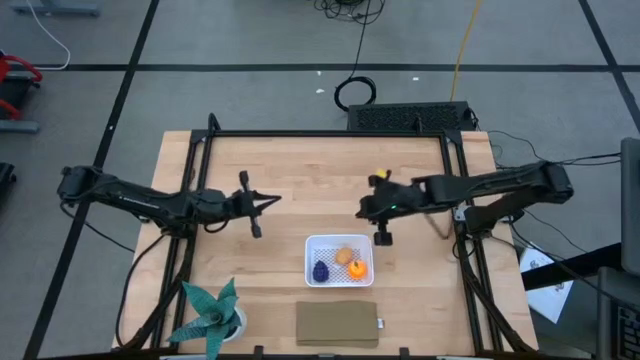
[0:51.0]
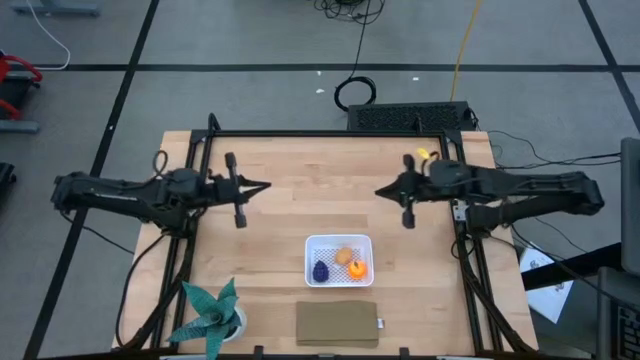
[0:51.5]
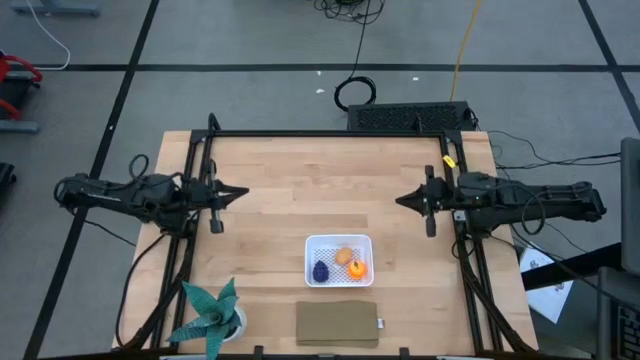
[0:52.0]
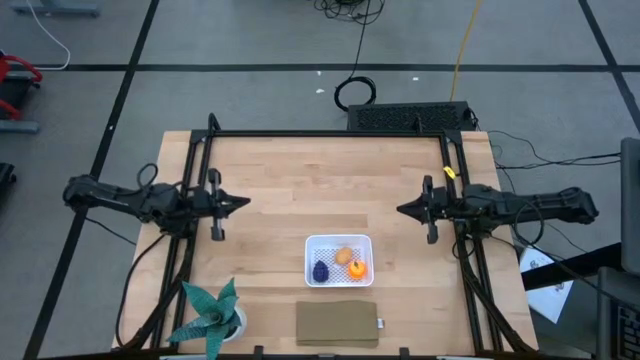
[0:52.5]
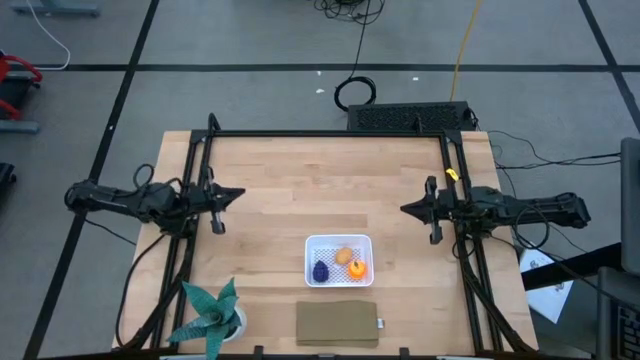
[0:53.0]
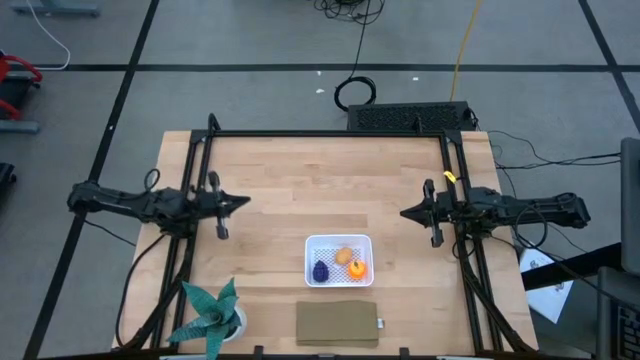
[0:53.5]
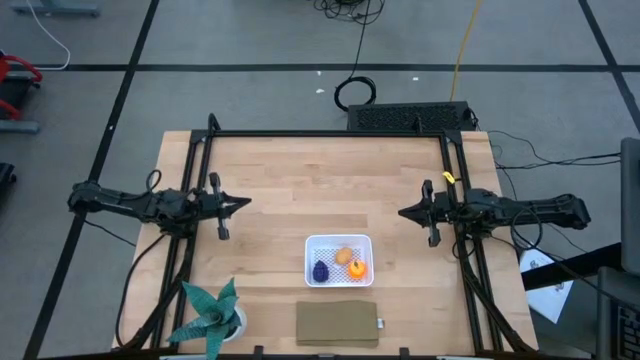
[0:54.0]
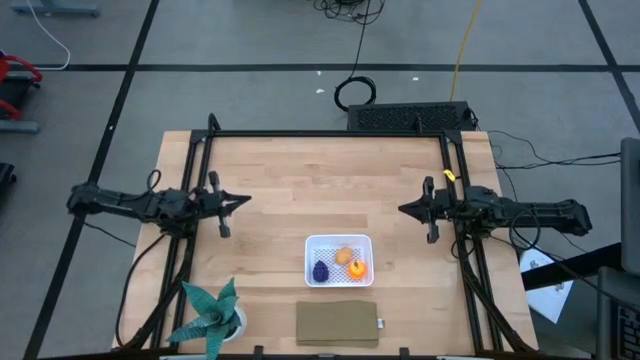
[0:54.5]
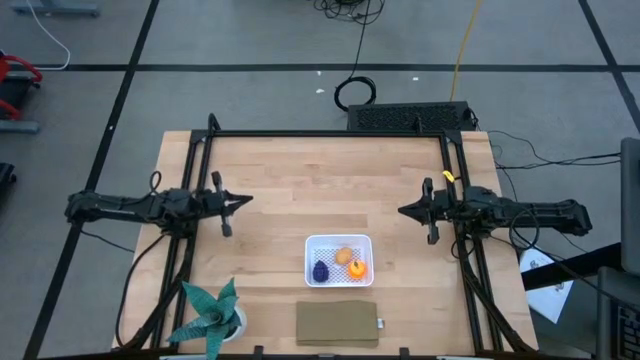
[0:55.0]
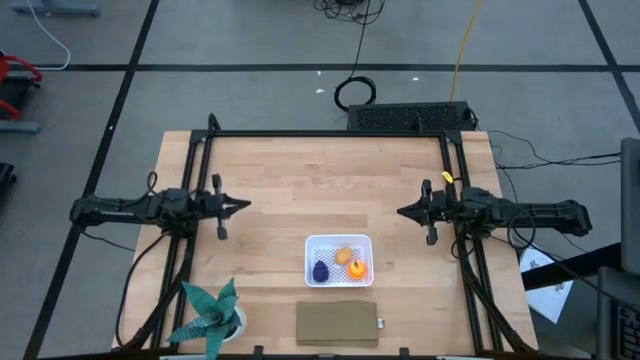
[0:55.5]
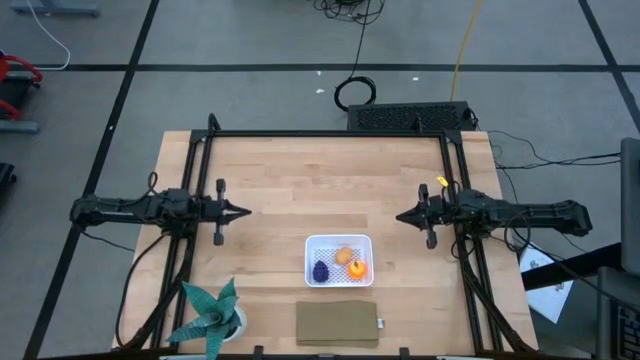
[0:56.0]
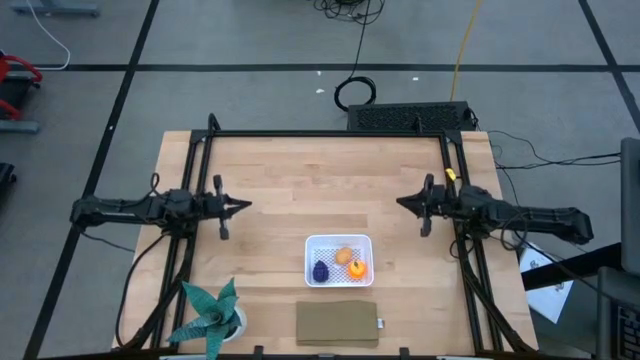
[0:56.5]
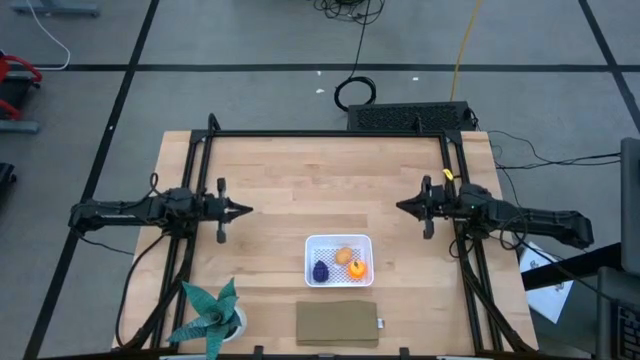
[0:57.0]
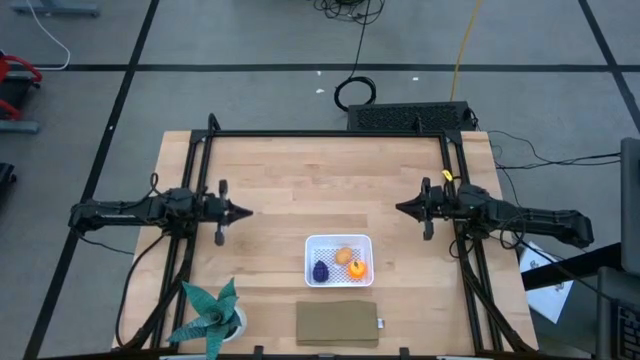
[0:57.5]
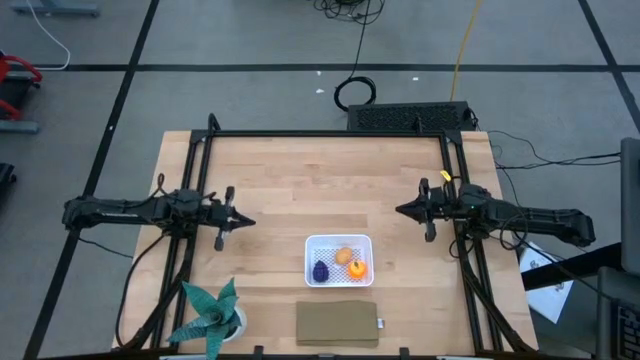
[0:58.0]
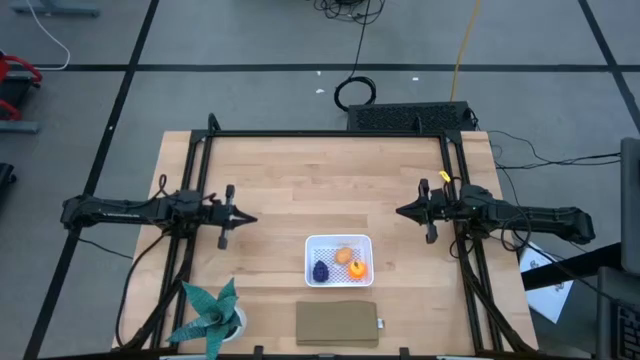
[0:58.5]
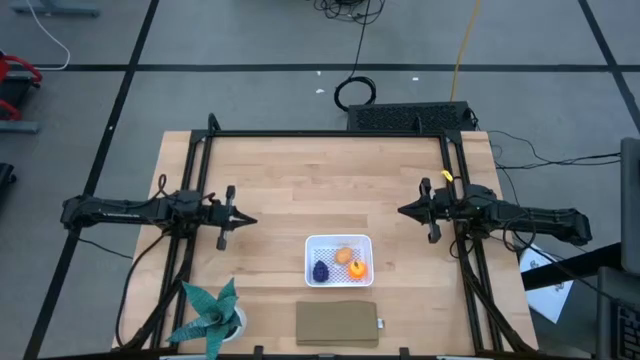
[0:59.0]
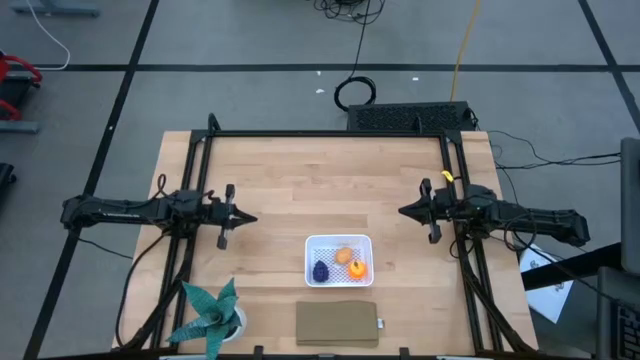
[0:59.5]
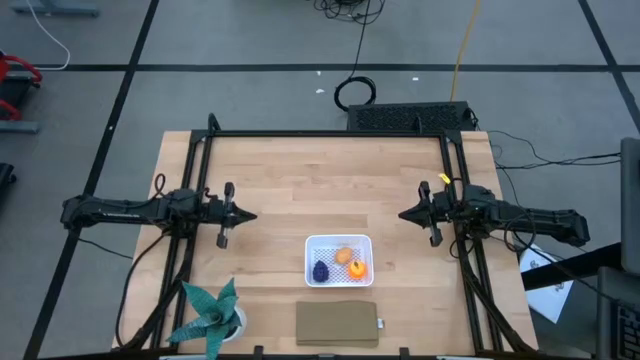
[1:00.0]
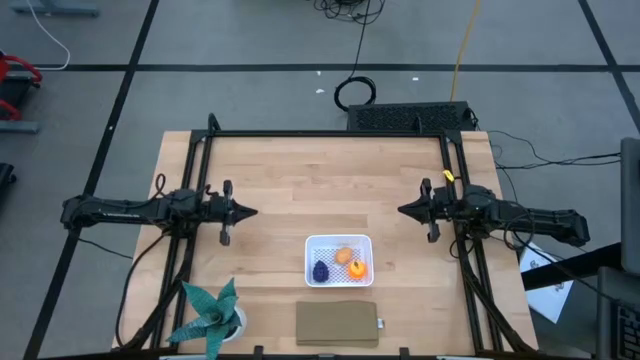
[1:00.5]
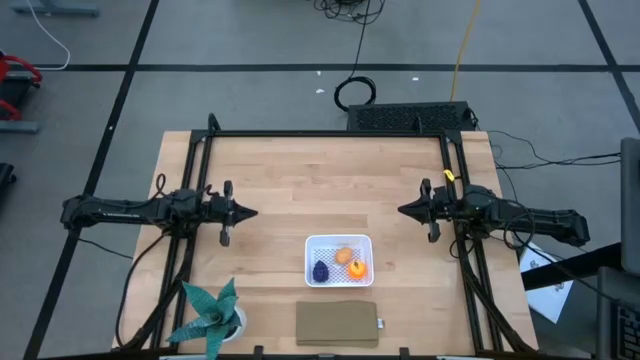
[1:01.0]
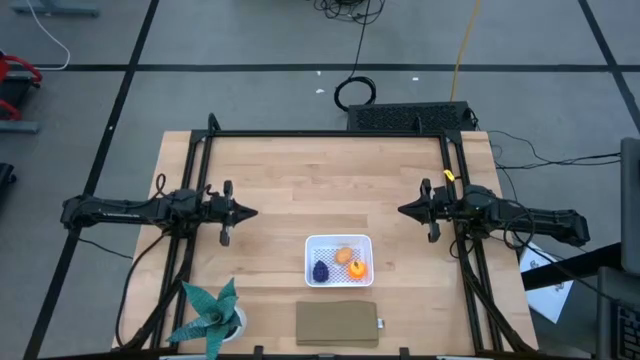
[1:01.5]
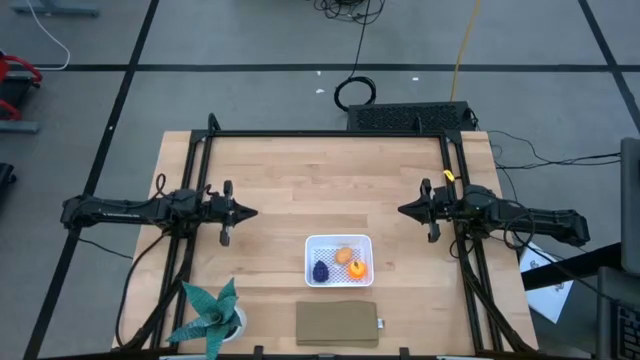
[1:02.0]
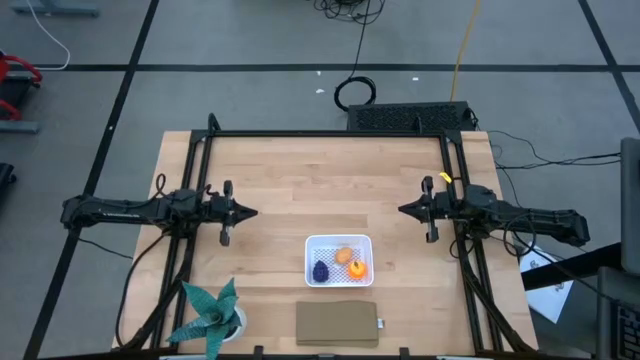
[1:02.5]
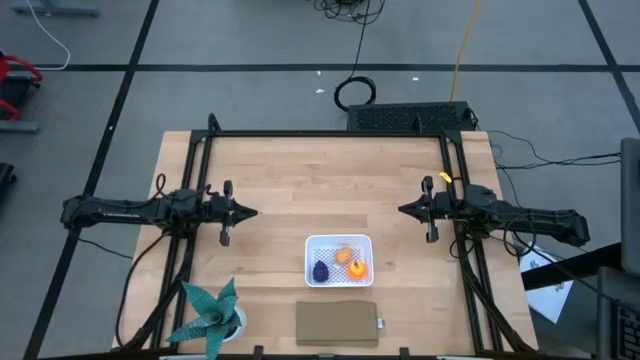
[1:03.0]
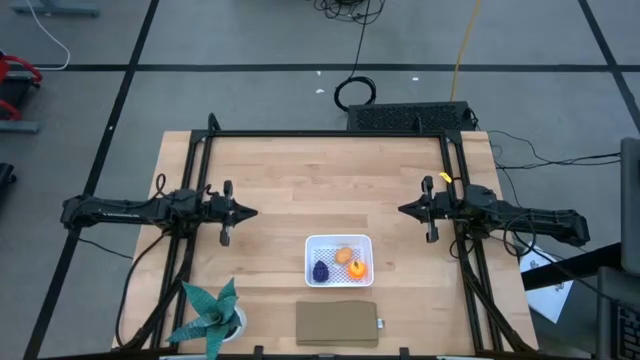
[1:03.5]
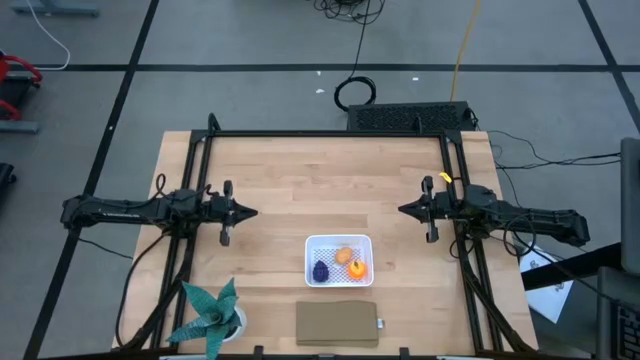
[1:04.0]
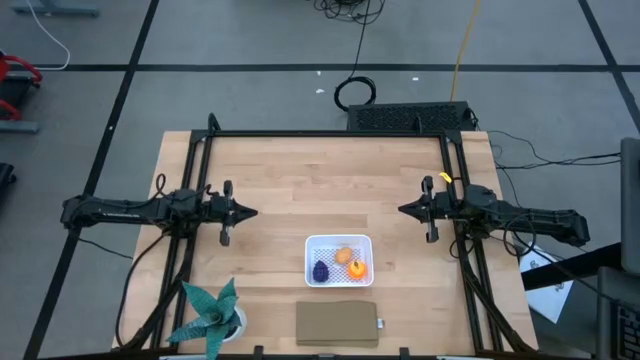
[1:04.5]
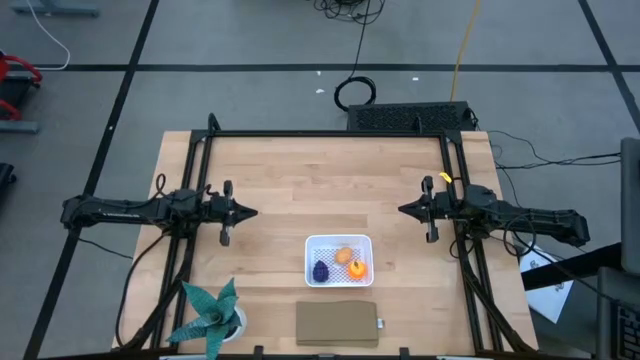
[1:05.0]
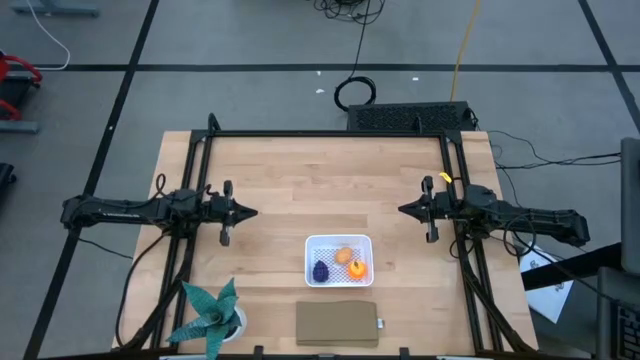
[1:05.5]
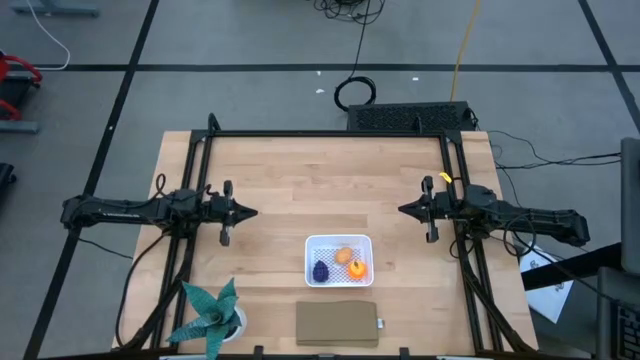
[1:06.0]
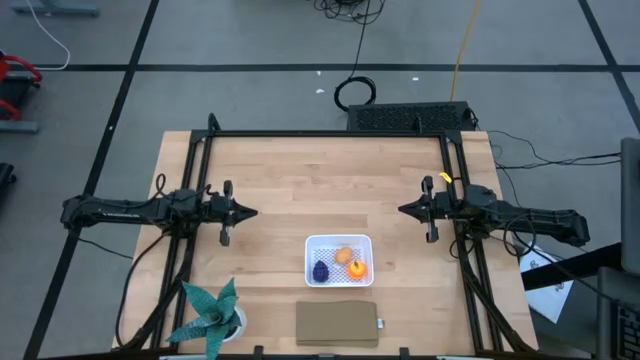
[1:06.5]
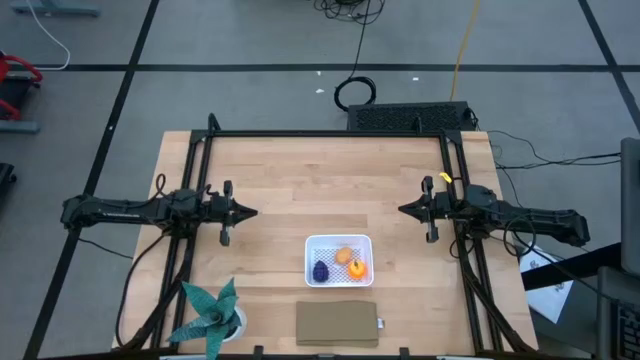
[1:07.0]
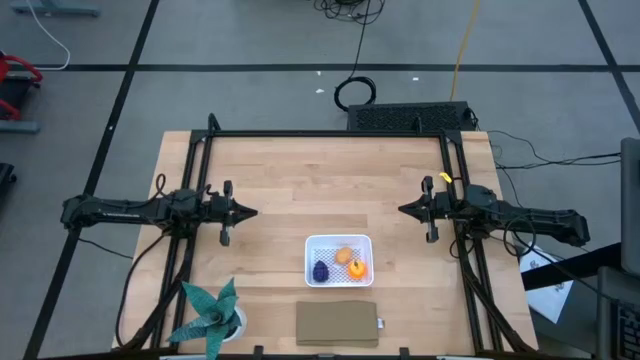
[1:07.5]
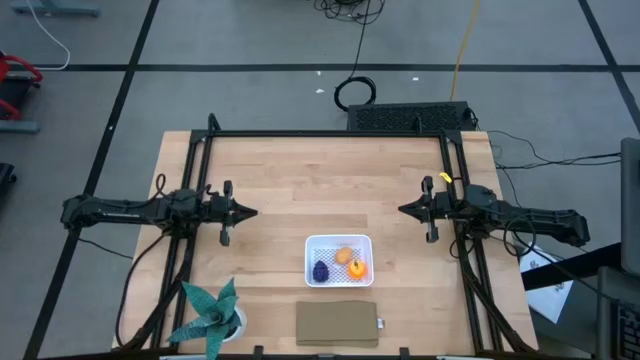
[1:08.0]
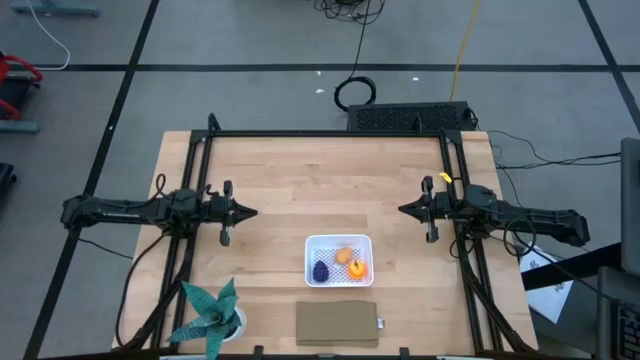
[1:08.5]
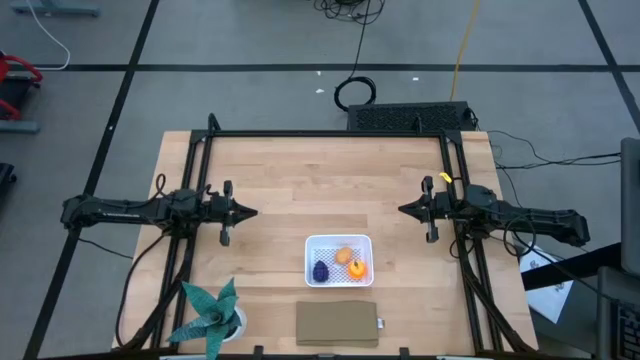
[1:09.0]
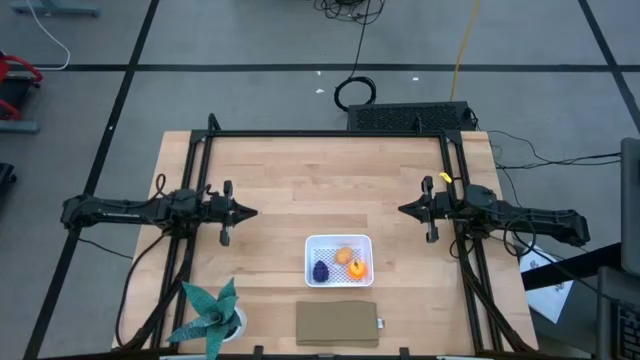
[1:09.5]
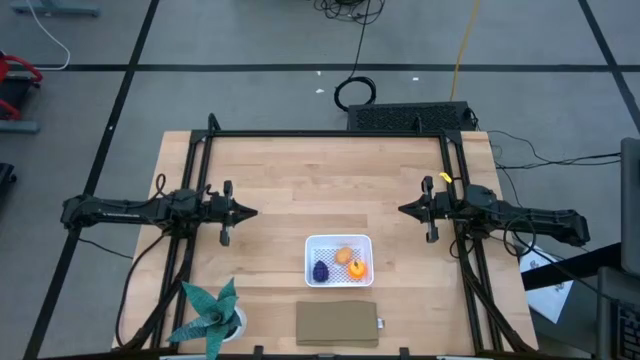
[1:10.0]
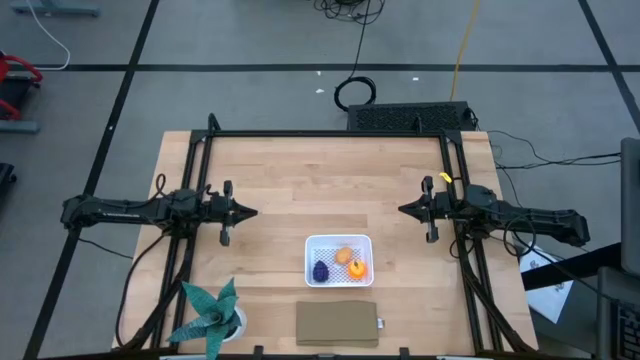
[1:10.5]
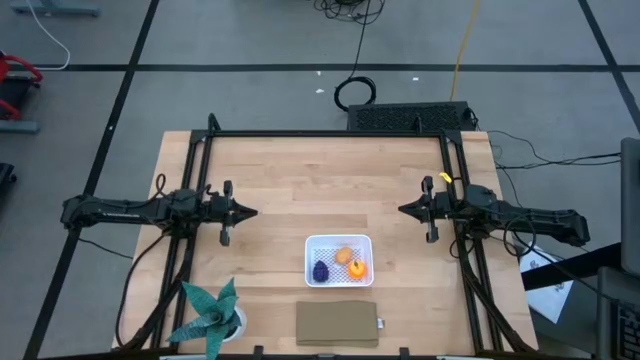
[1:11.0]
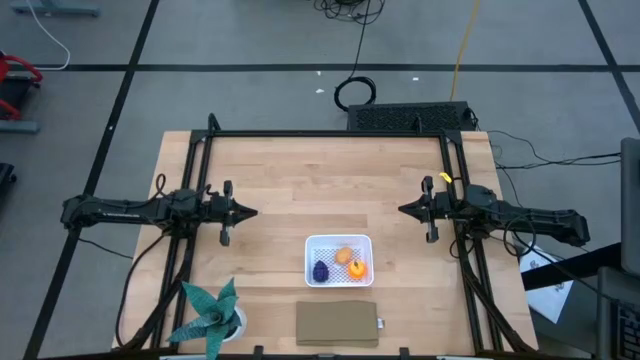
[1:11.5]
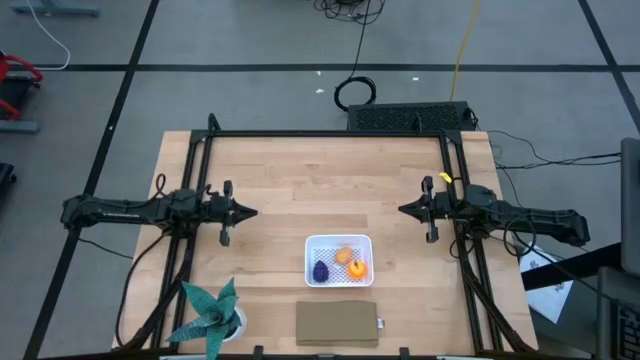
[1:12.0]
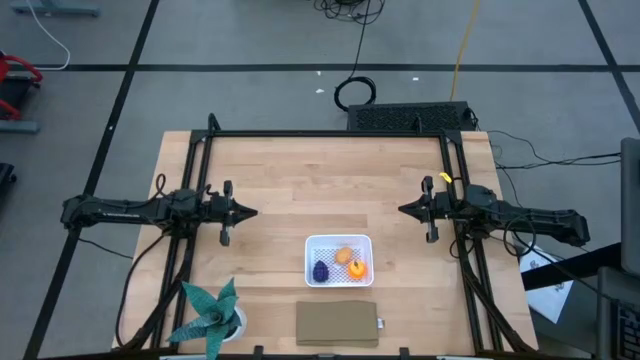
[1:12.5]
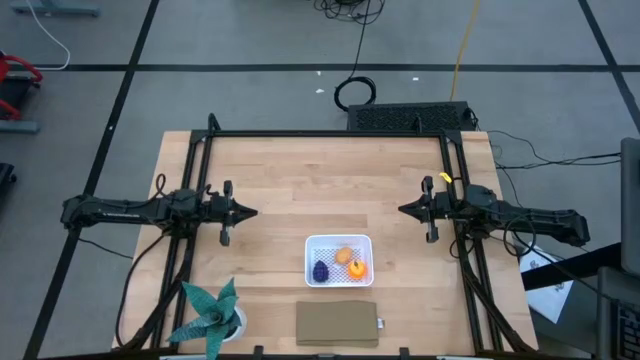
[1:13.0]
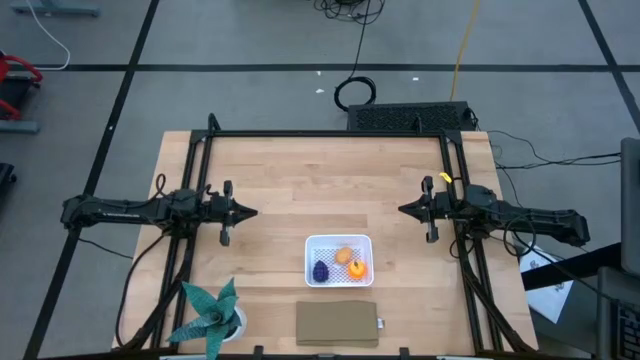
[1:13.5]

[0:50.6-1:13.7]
Task: Pick and placing Produce into tupperware
Return to Home Position
